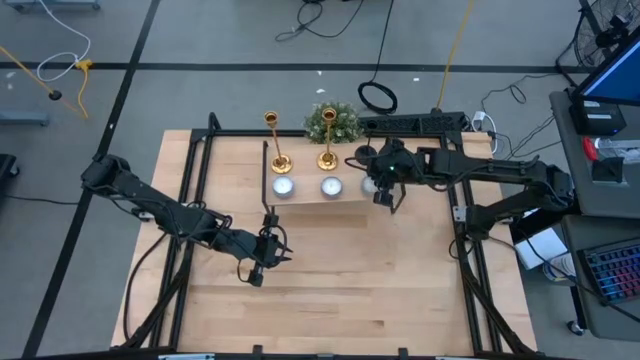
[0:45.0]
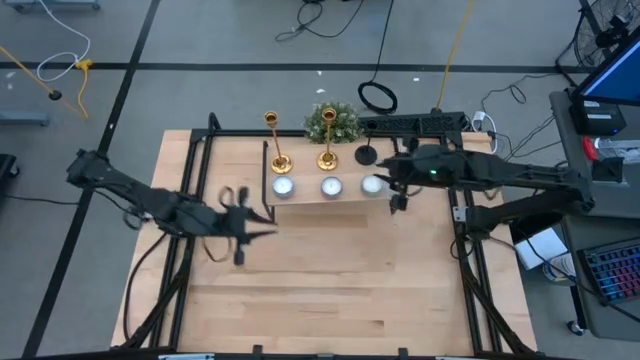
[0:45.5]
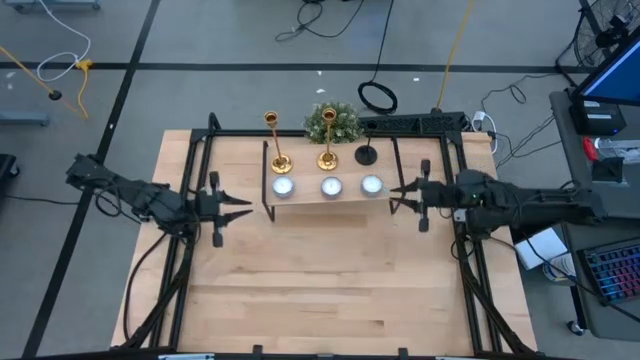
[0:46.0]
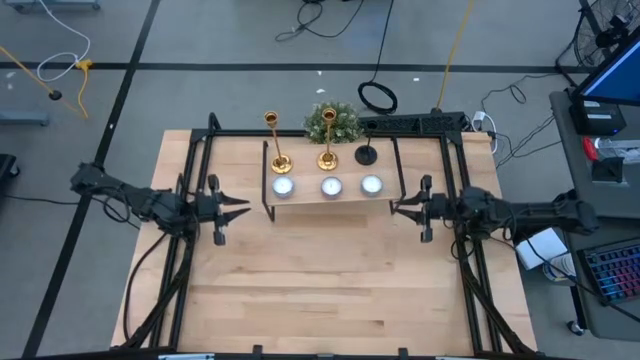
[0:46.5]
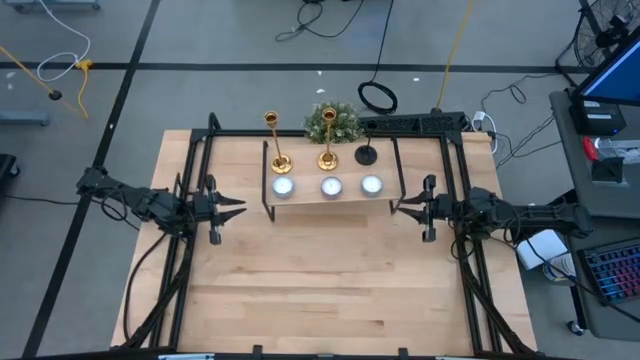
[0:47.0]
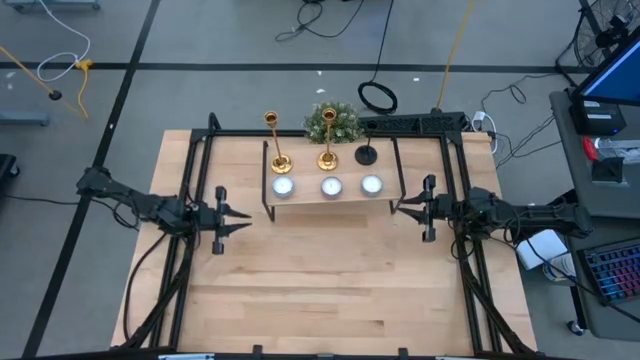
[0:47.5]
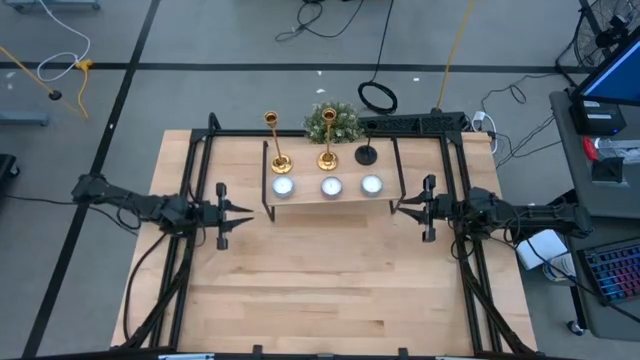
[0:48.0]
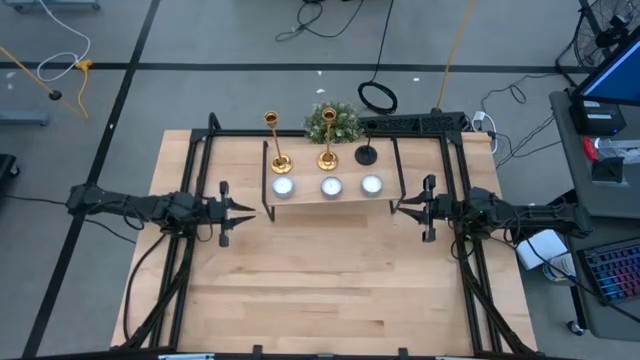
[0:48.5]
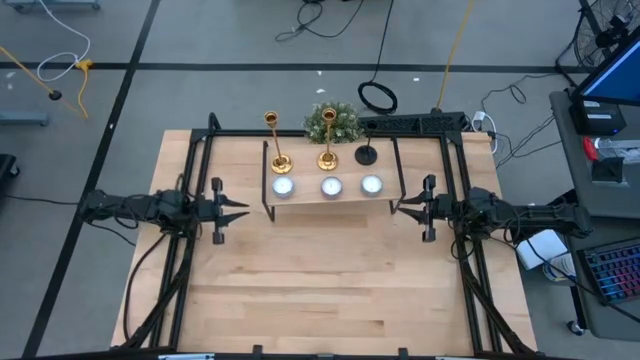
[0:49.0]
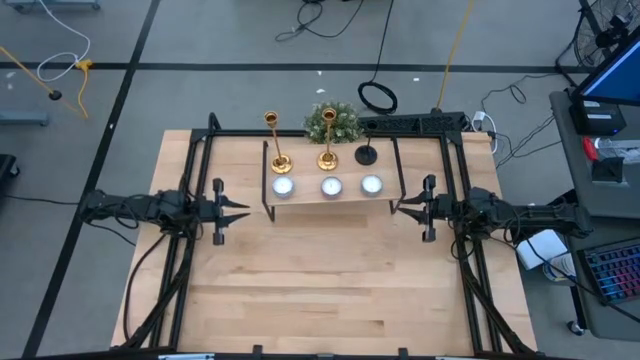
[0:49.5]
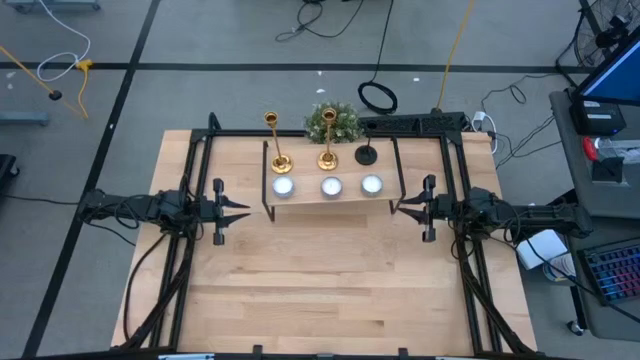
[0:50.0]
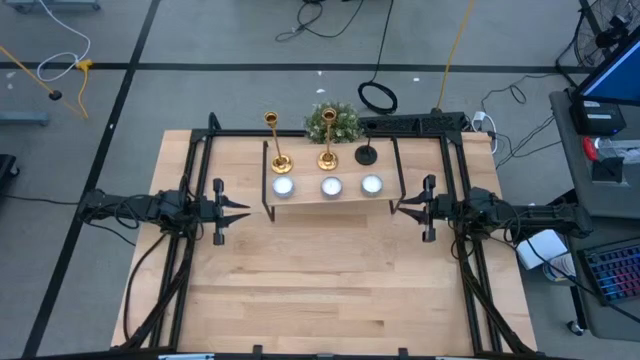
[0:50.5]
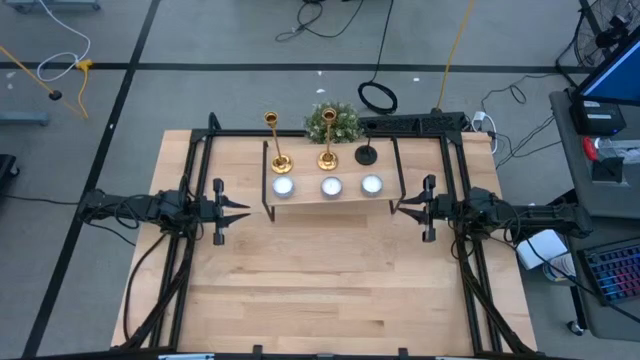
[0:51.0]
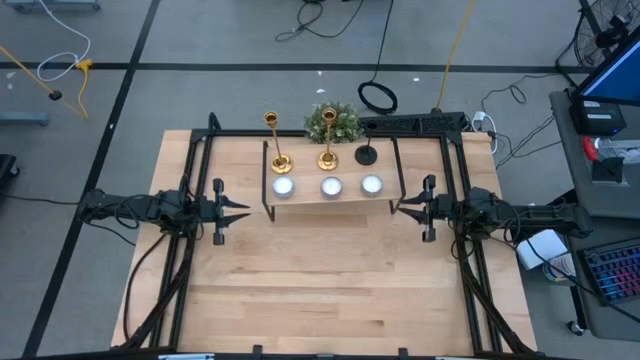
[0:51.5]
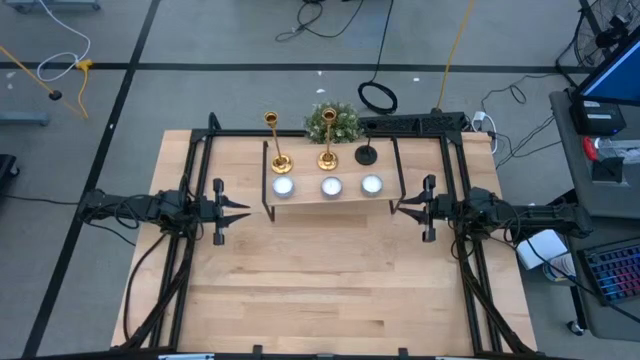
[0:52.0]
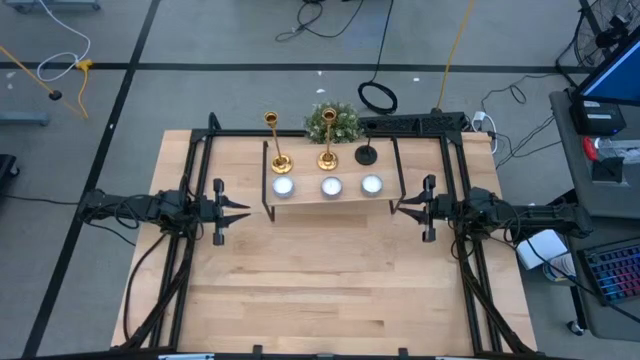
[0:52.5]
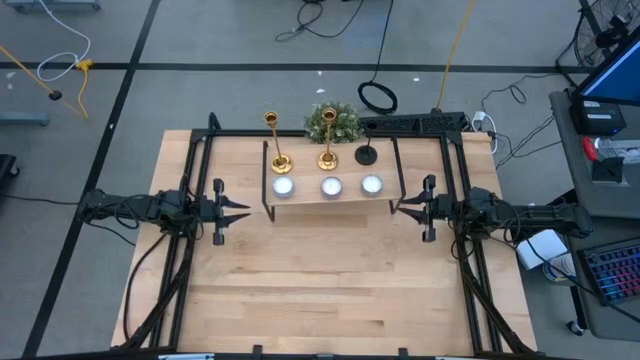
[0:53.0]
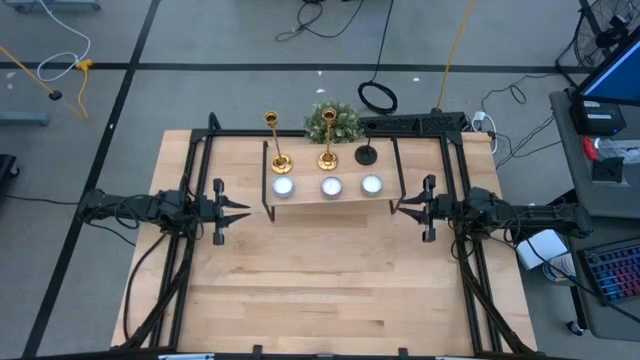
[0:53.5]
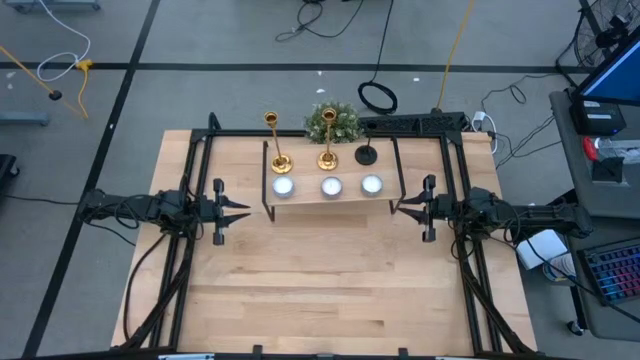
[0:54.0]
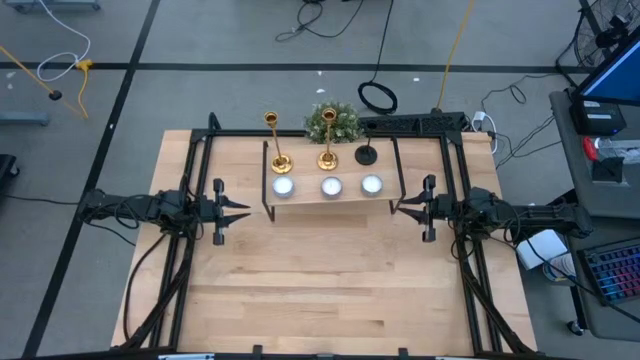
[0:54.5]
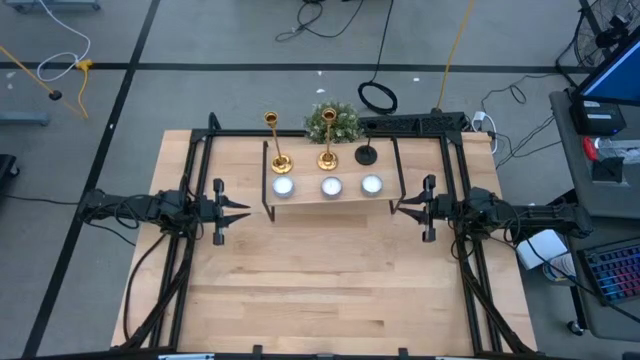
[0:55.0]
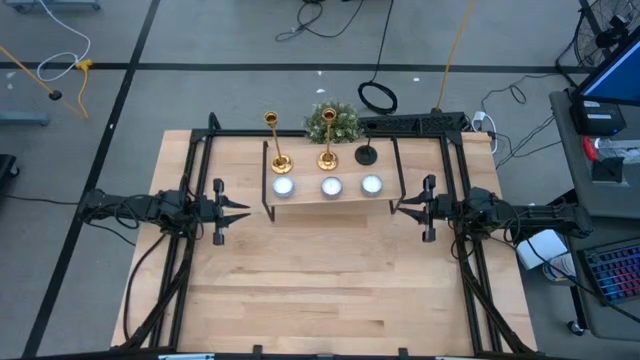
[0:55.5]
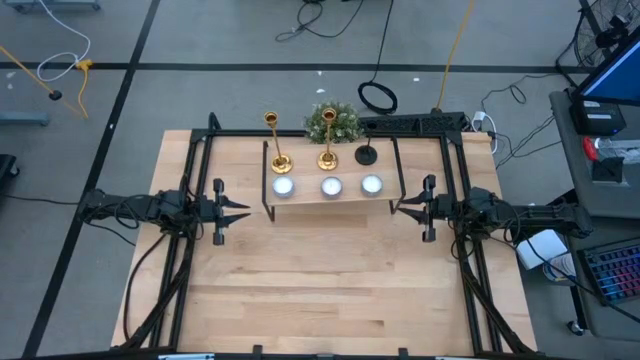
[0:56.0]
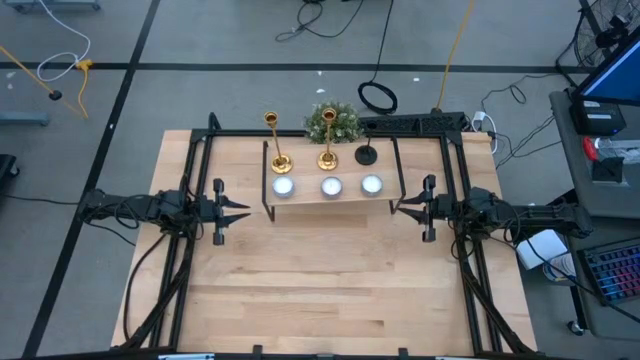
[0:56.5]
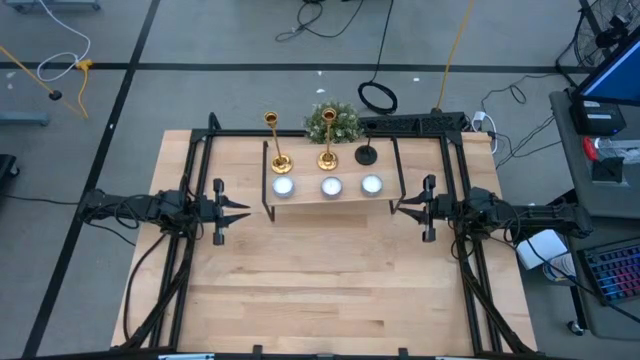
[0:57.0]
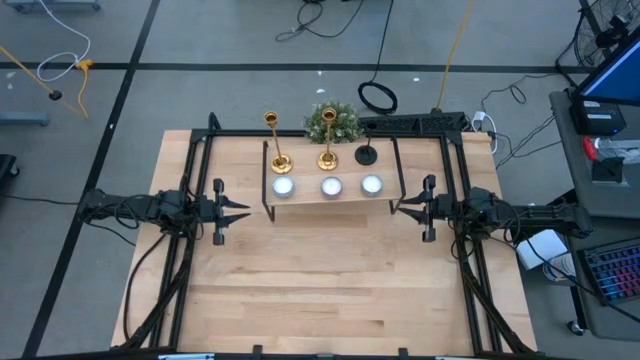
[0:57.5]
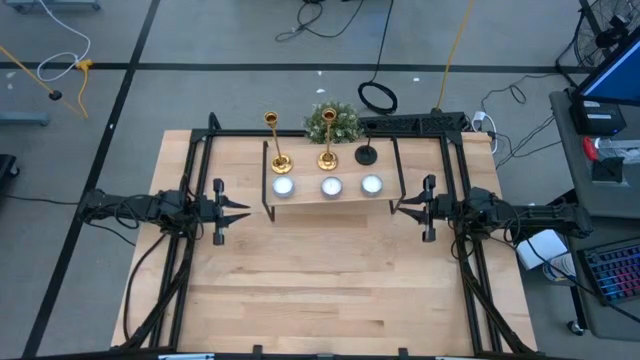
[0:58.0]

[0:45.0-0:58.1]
Task: Pick & Place candle stick holders
Return to Home Position

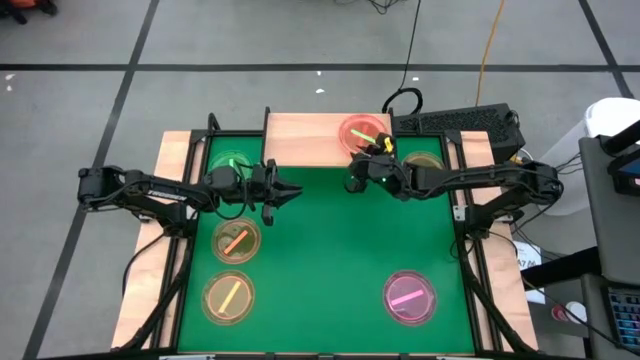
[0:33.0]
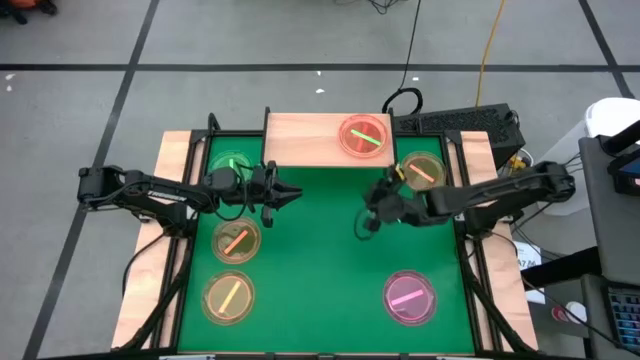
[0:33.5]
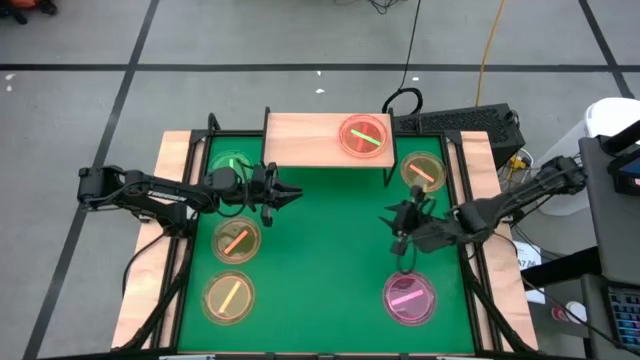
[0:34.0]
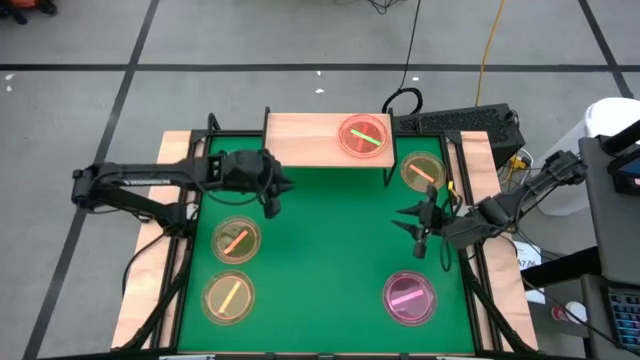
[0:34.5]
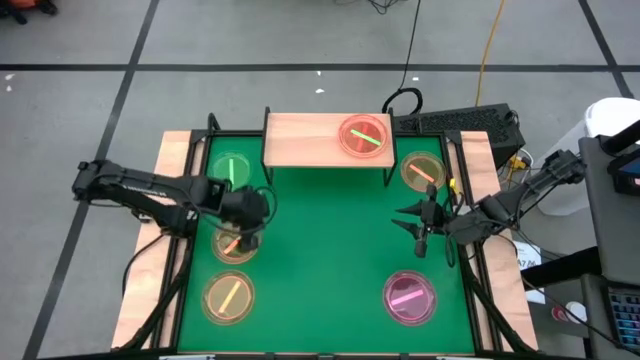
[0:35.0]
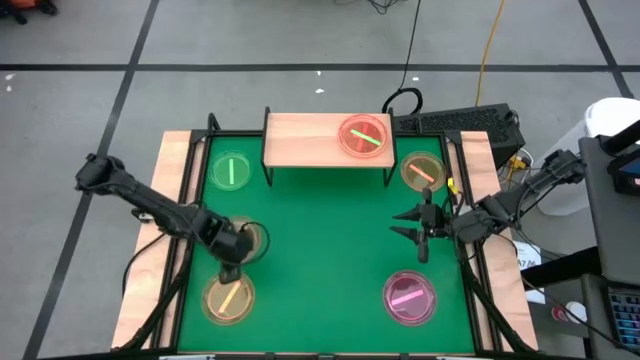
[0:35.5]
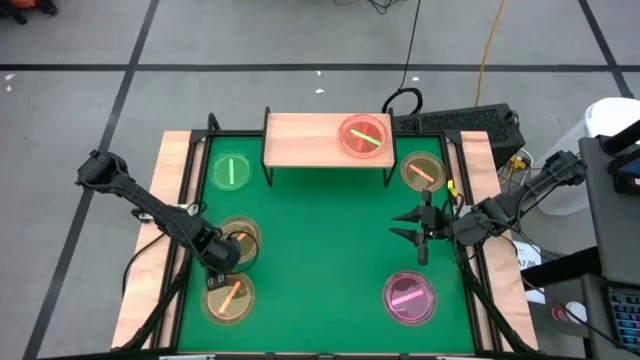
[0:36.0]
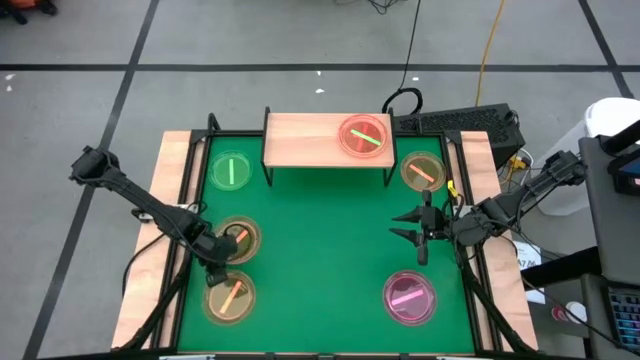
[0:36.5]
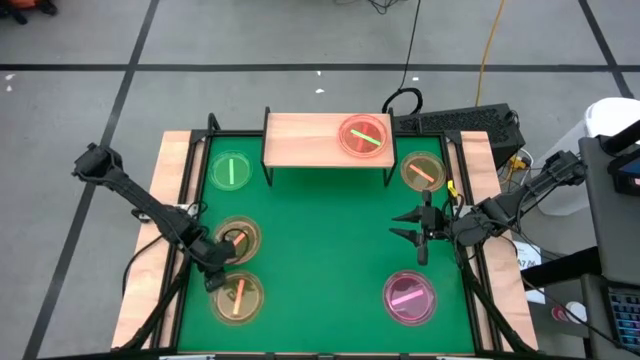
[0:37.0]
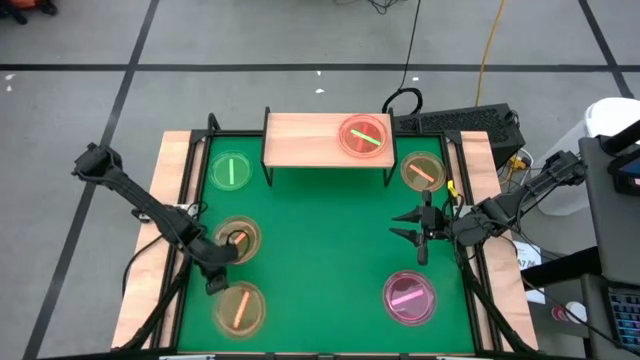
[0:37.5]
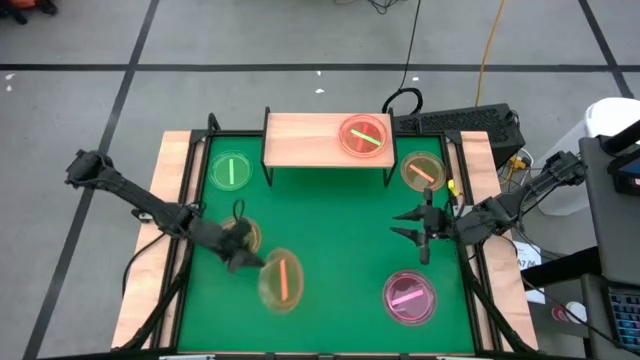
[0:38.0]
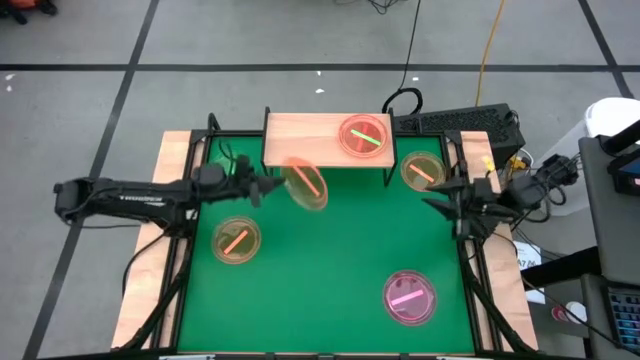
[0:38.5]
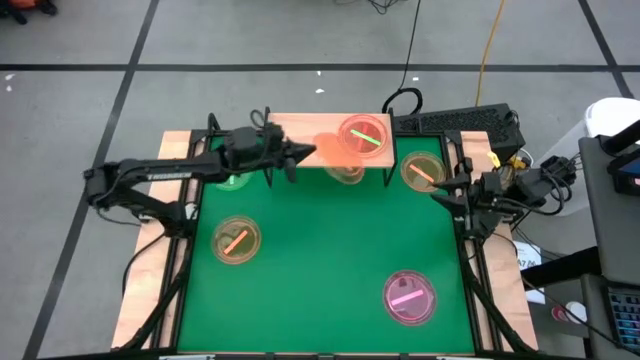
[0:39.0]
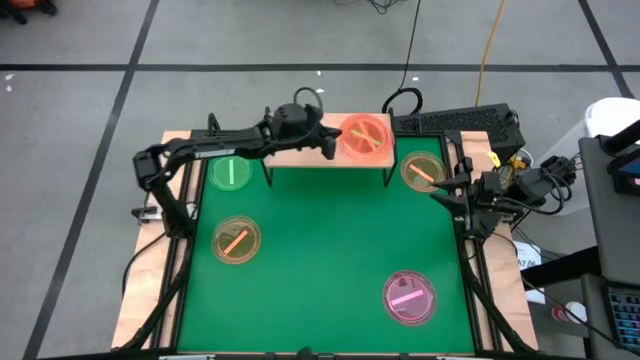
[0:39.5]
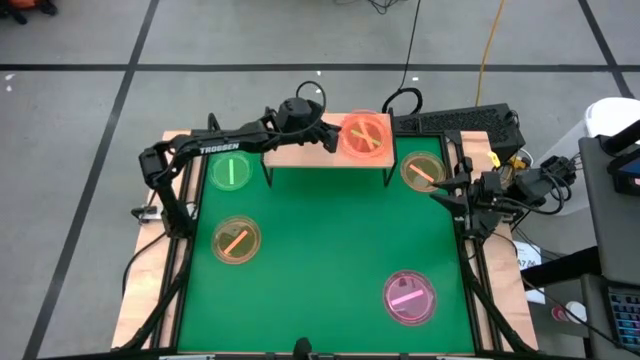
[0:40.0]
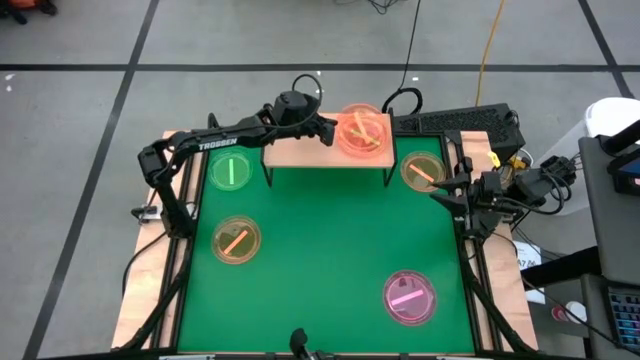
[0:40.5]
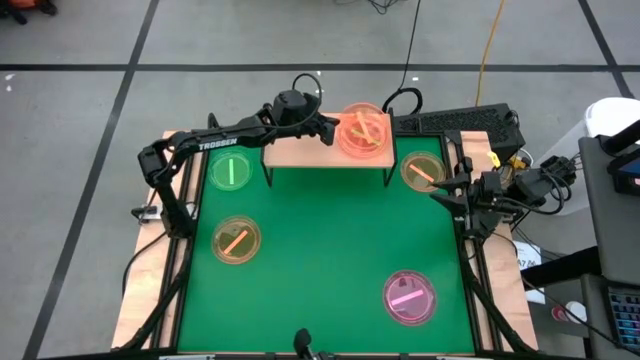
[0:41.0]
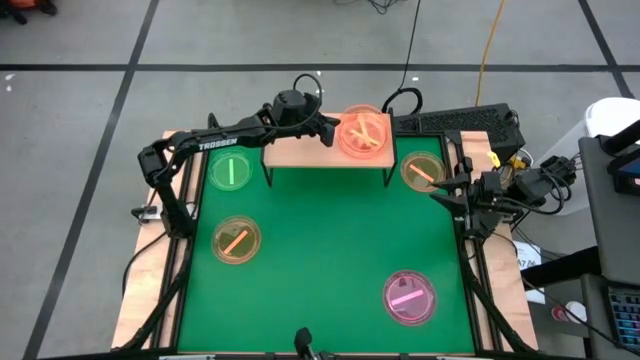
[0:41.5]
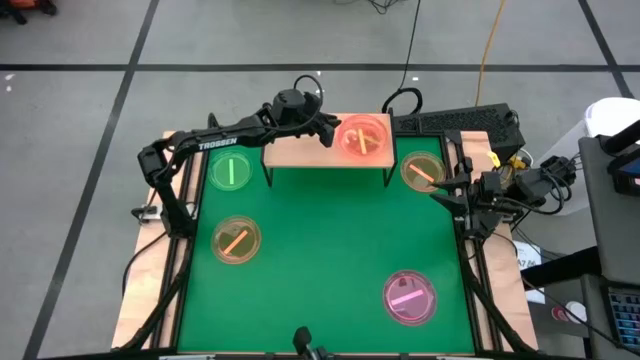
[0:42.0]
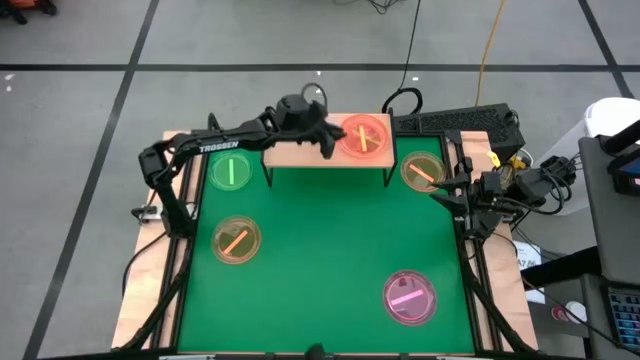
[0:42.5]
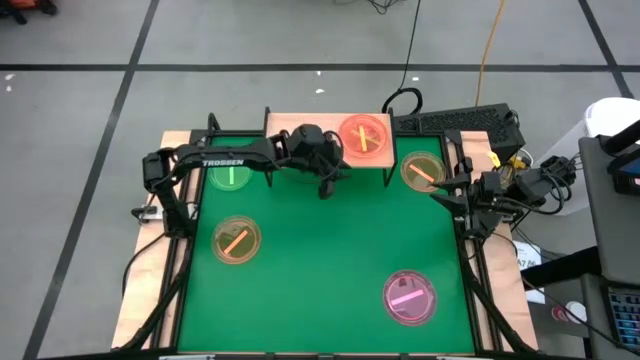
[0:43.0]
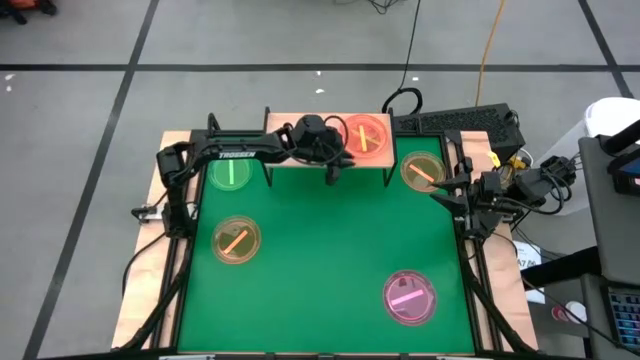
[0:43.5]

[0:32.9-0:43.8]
Task: Place and stack plates onto a shelf
Stack the orange plate on top of the green plate on the shelf
